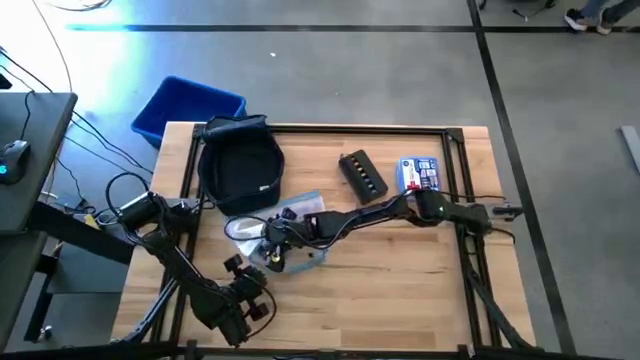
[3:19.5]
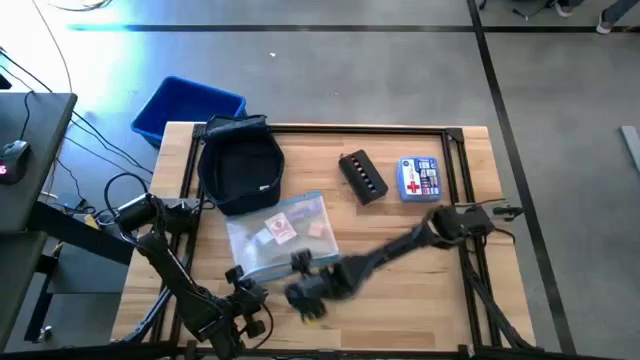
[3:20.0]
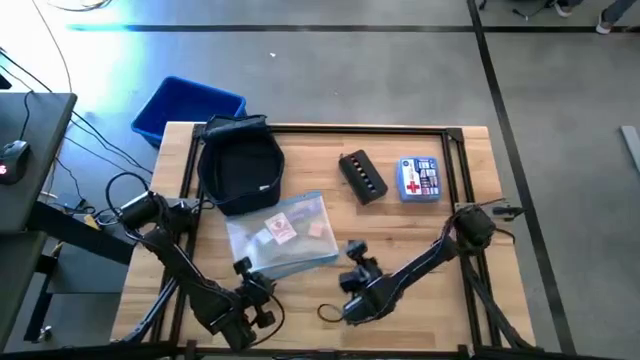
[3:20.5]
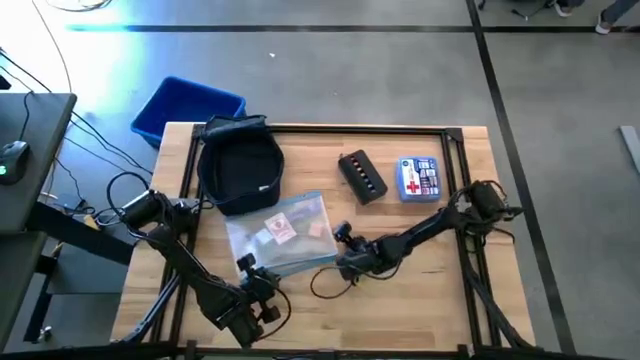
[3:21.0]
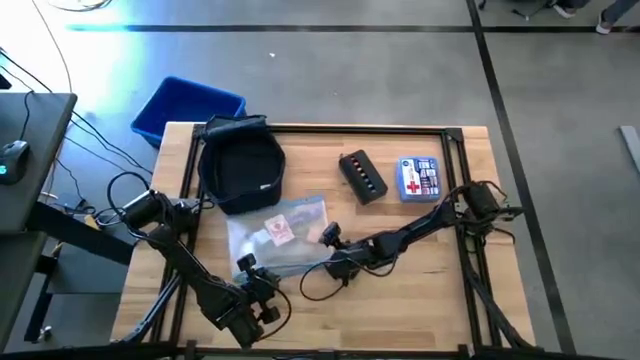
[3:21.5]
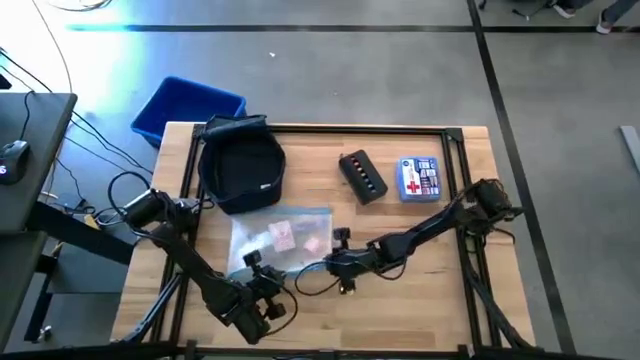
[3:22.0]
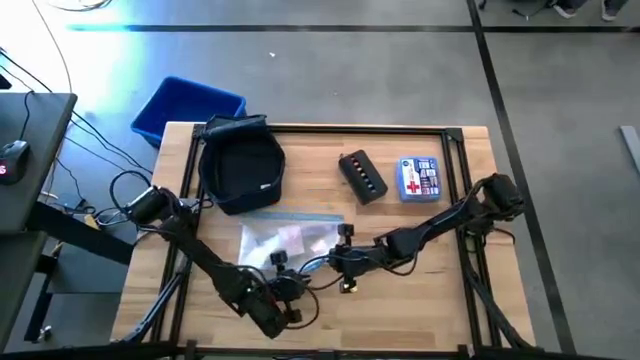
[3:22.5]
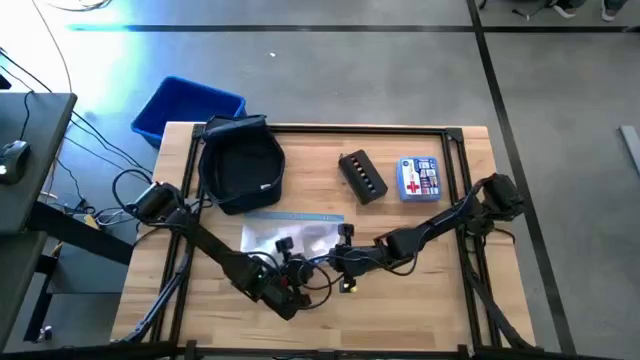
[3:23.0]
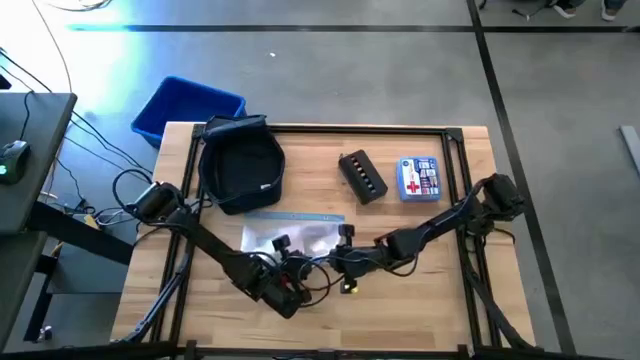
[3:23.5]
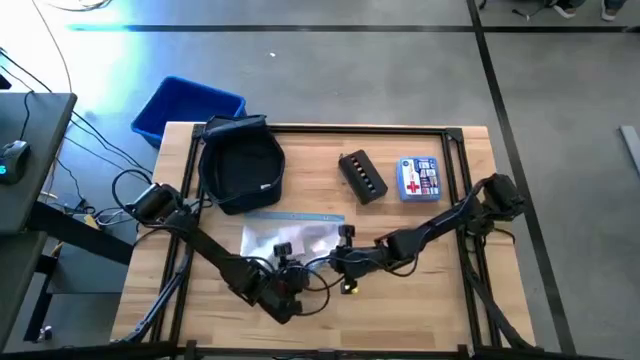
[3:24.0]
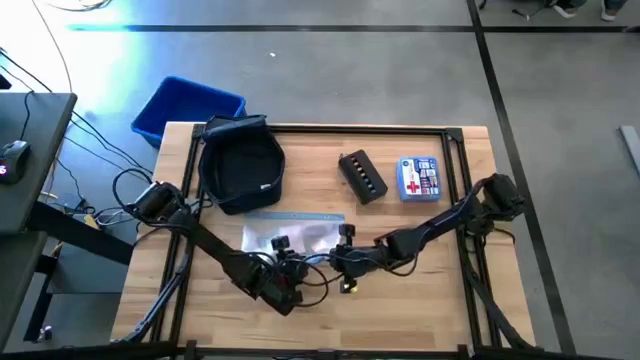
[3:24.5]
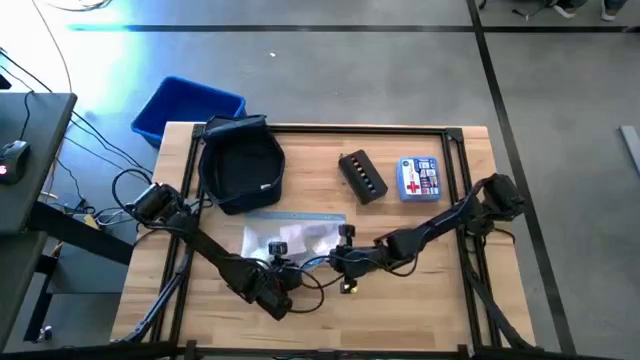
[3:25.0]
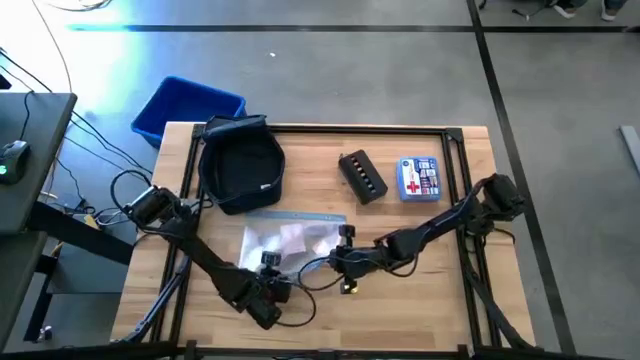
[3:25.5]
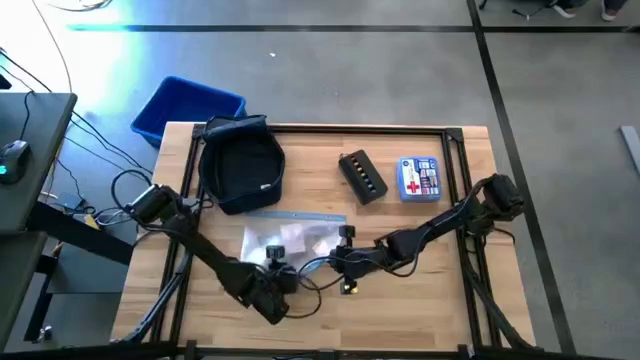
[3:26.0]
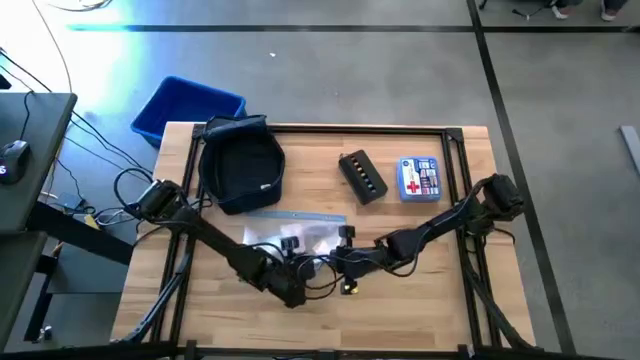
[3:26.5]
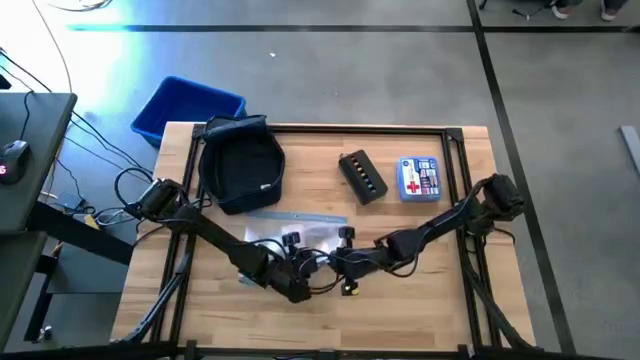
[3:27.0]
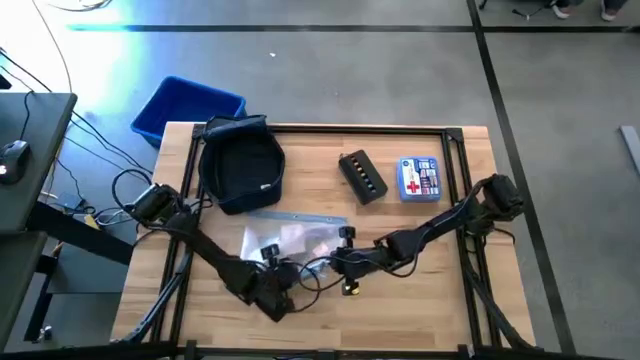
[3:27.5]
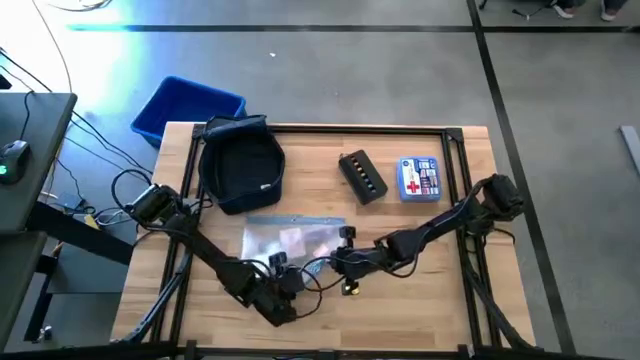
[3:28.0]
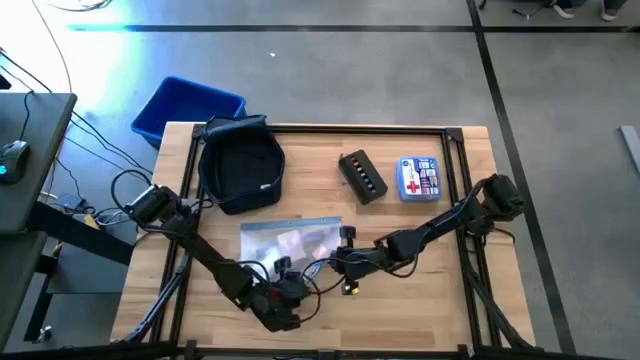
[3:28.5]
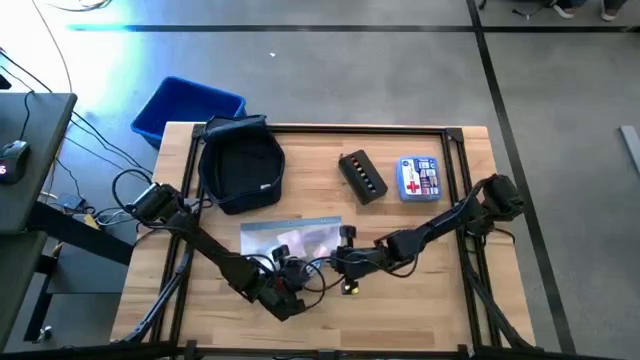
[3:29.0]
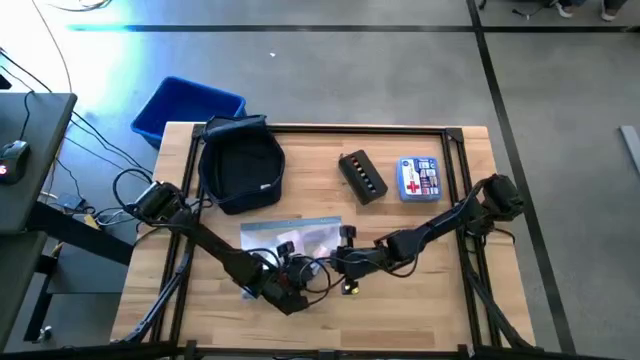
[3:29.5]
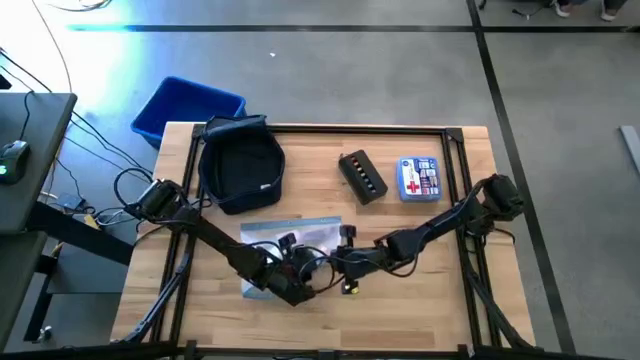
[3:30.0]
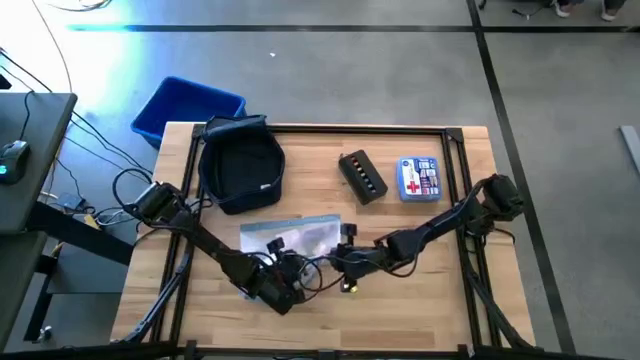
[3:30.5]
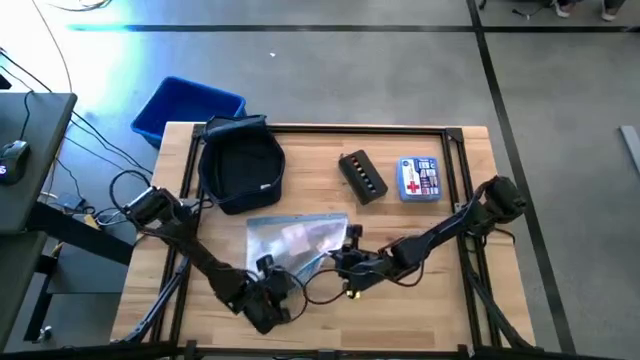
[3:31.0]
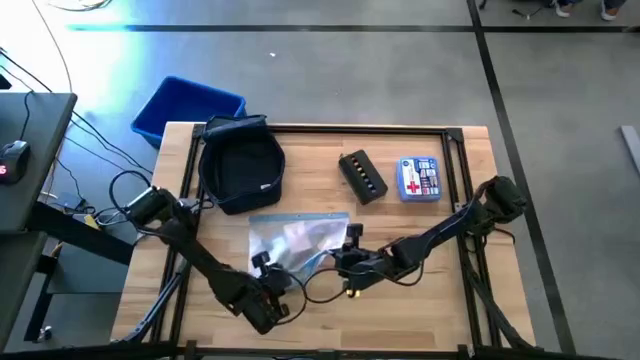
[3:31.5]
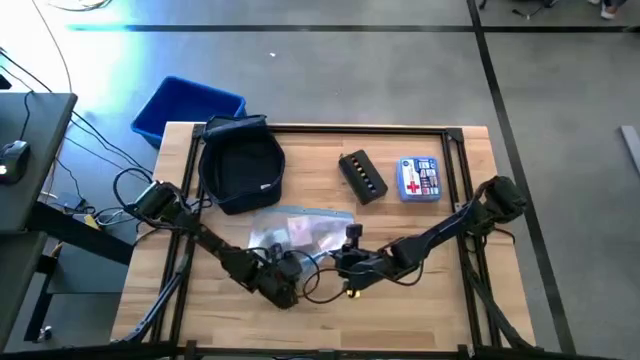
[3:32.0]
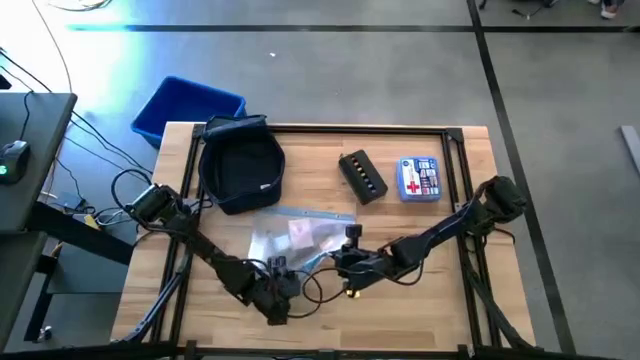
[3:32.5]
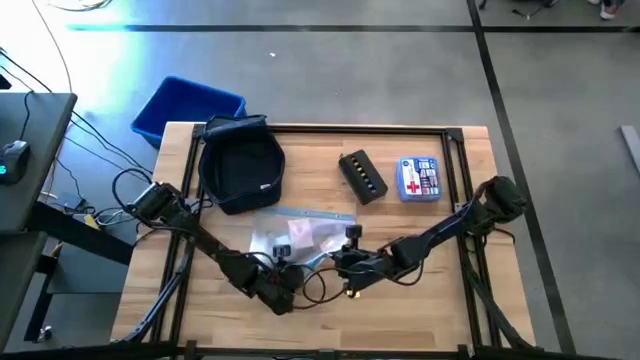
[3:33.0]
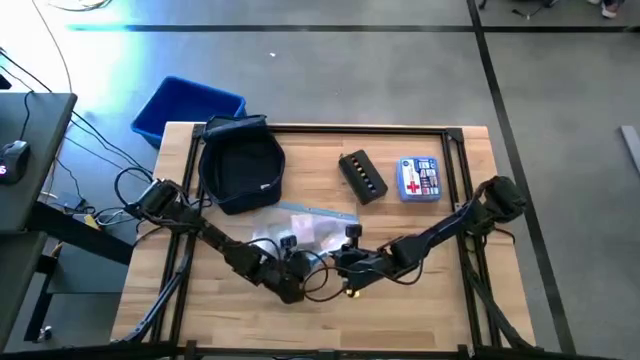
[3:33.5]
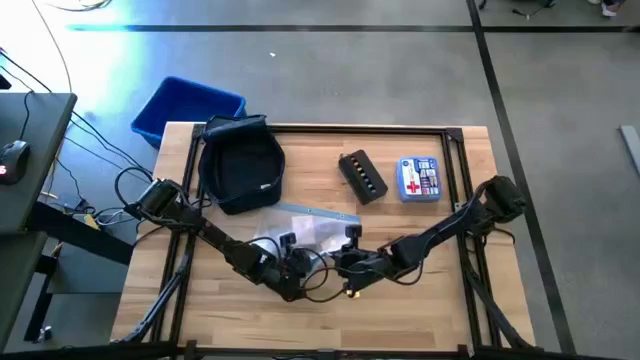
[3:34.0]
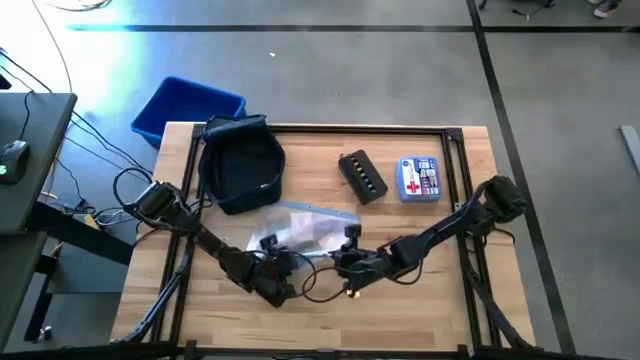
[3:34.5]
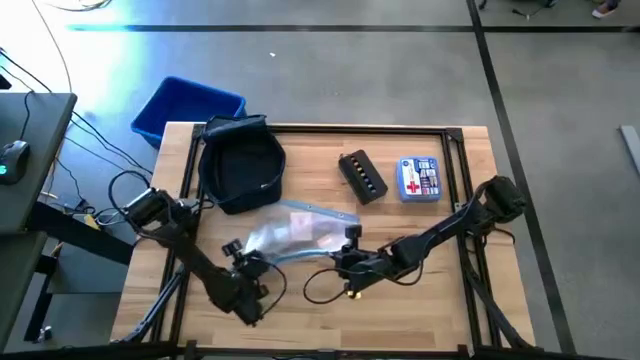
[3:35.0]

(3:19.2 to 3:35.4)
Task: Unpack backpack
Close the white zip bag

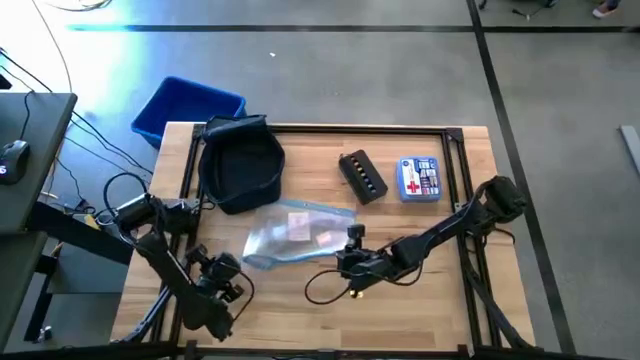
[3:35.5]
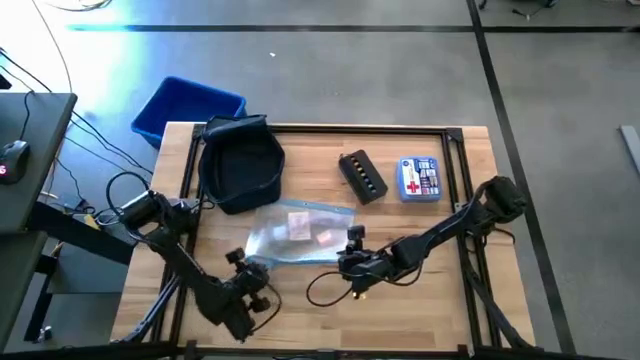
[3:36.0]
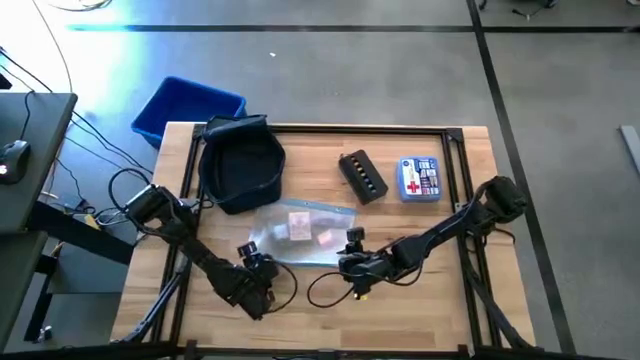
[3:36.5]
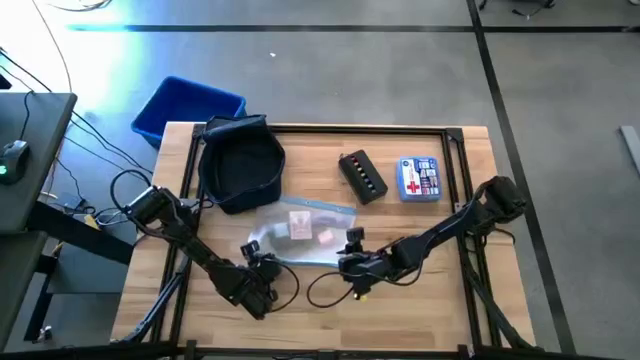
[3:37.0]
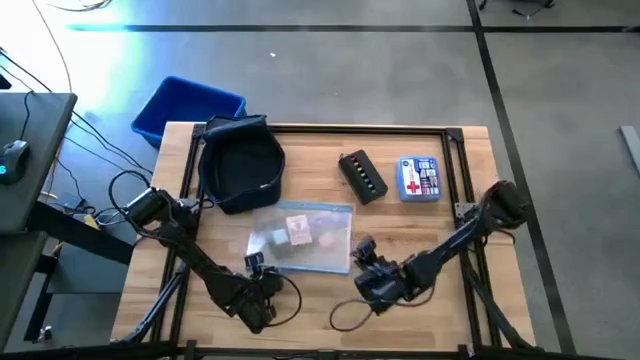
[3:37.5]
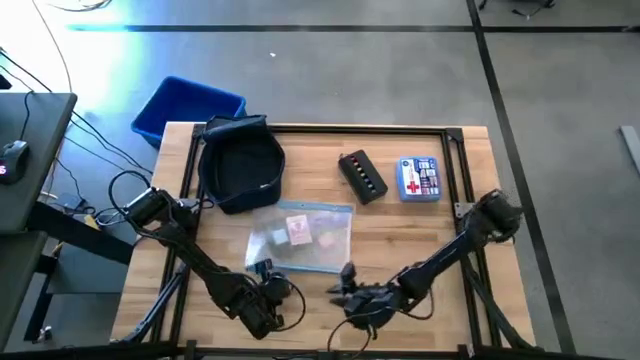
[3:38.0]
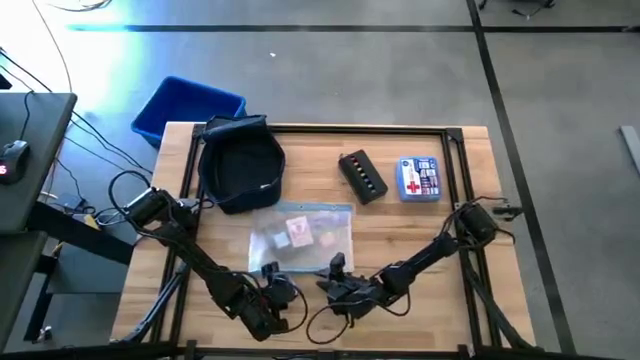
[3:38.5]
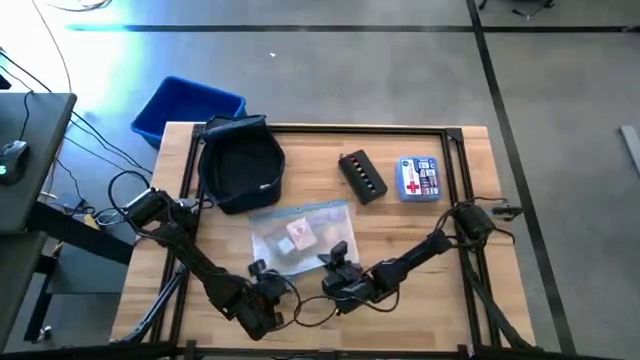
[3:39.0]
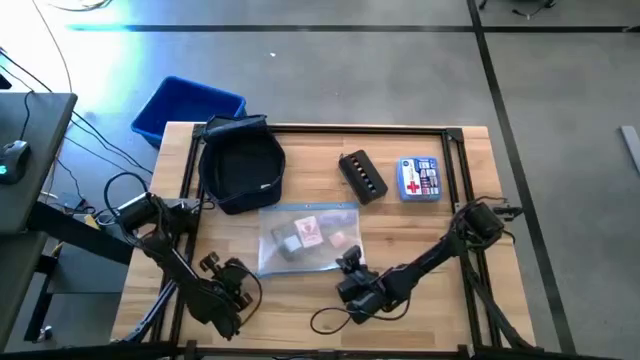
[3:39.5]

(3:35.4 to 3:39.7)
Close the white zip bag

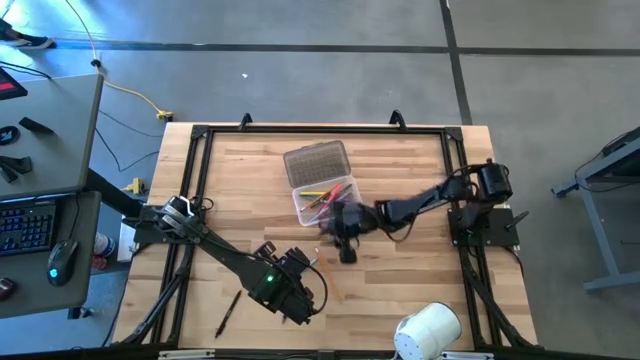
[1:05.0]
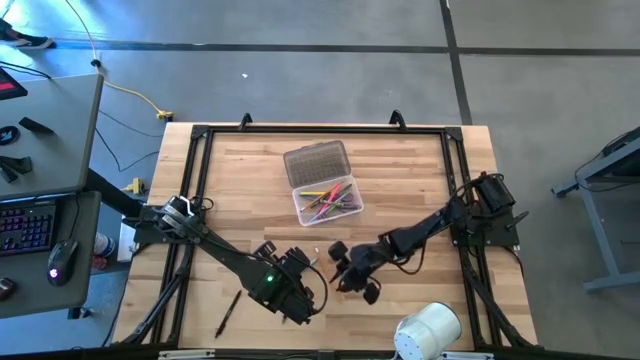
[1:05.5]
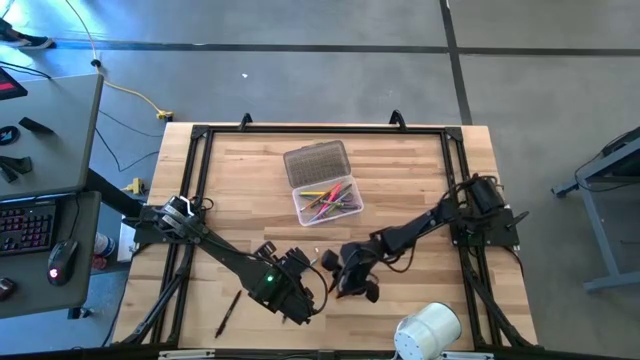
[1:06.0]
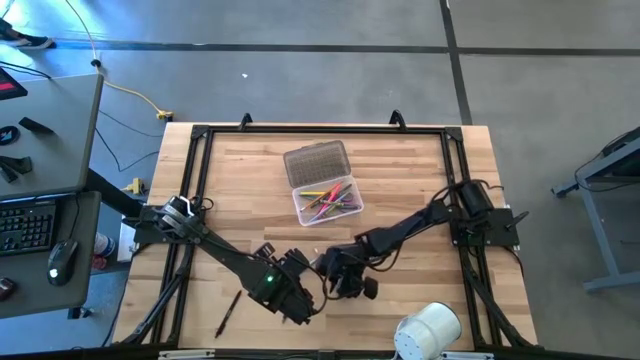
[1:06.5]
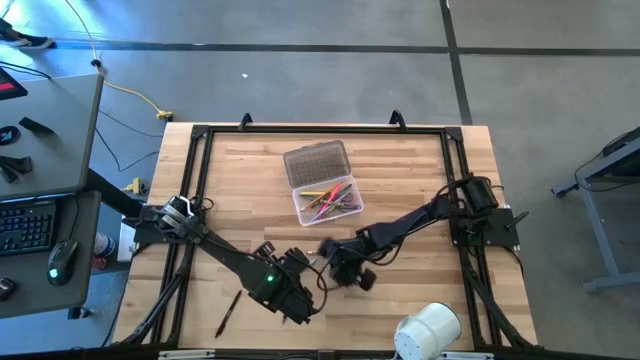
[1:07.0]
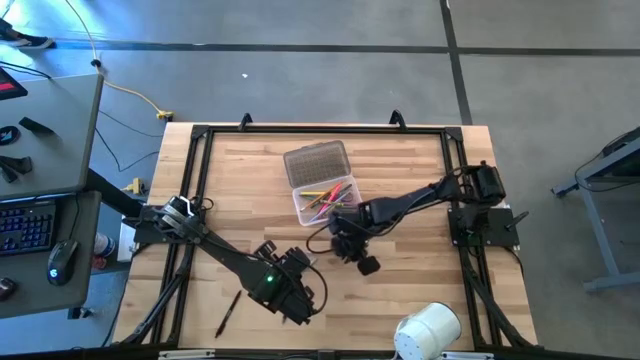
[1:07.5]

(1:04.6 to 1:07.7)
Task: Pick & place school supplies into a supply box
Put the orange pencil into the supply box
